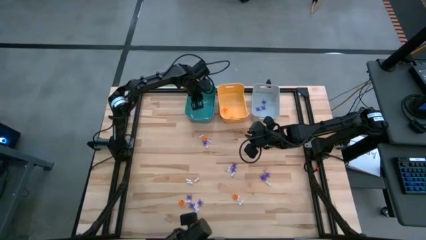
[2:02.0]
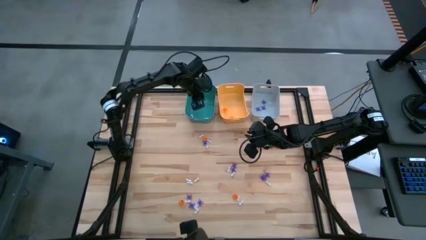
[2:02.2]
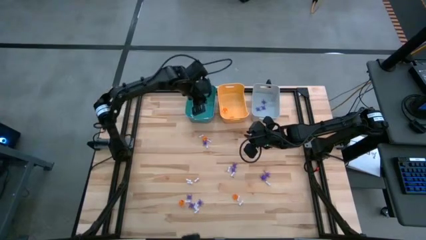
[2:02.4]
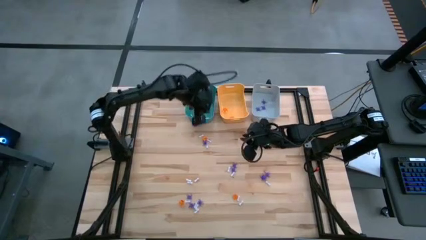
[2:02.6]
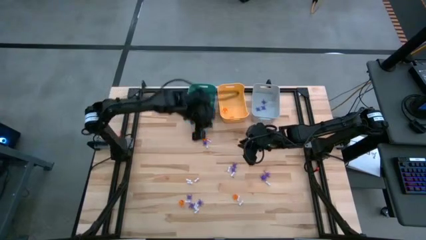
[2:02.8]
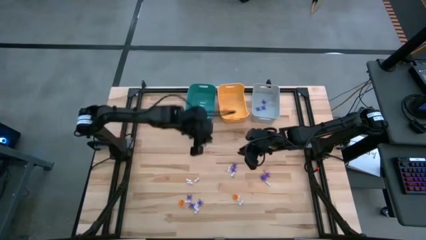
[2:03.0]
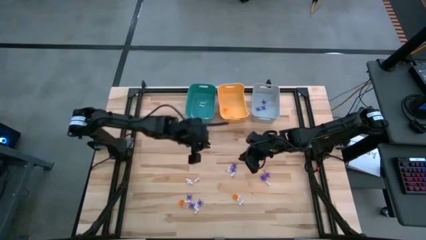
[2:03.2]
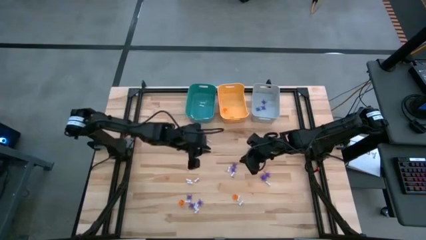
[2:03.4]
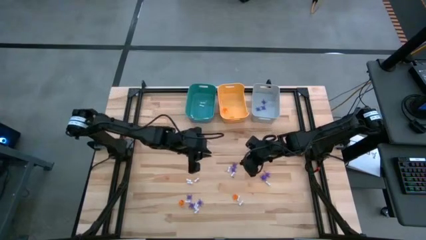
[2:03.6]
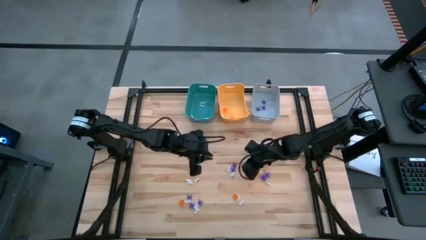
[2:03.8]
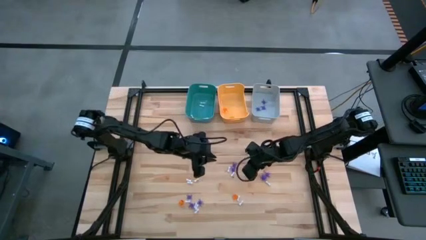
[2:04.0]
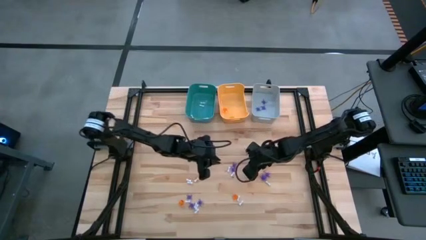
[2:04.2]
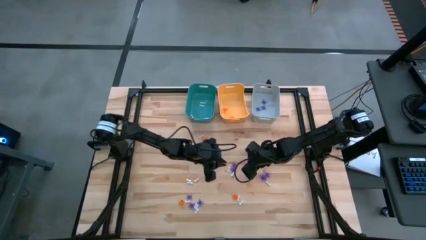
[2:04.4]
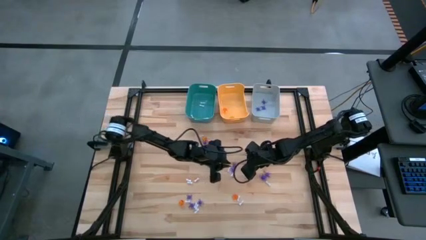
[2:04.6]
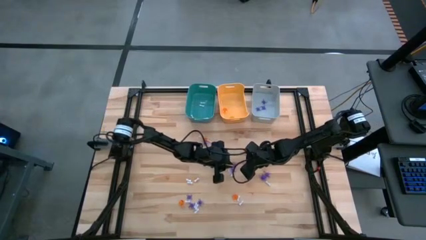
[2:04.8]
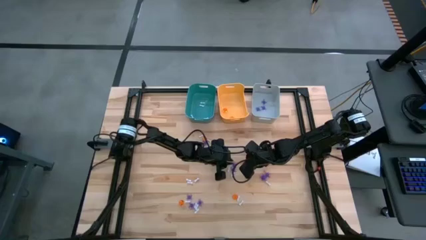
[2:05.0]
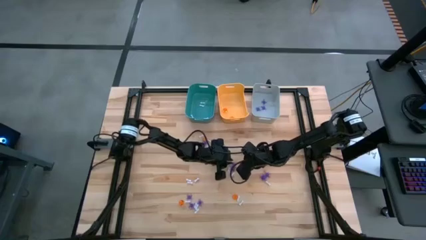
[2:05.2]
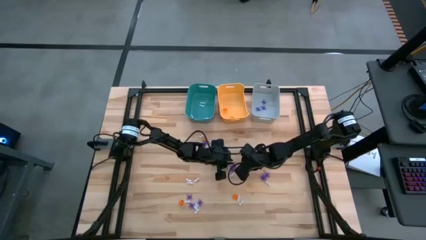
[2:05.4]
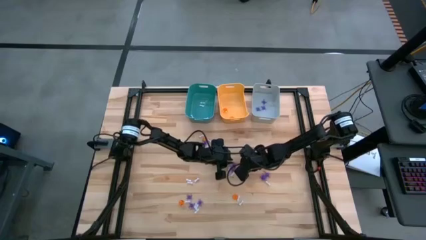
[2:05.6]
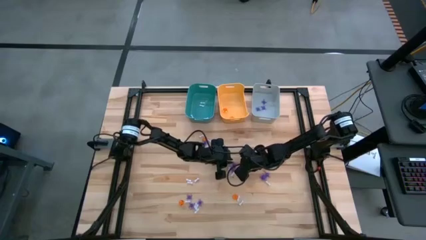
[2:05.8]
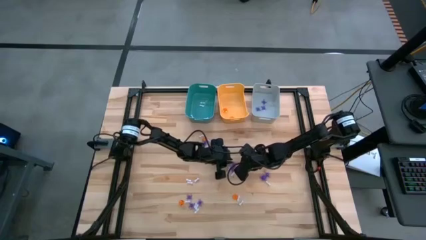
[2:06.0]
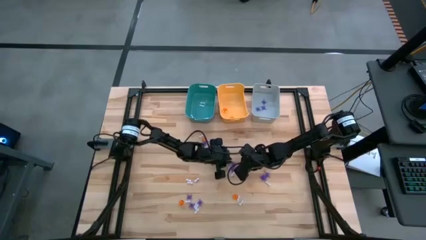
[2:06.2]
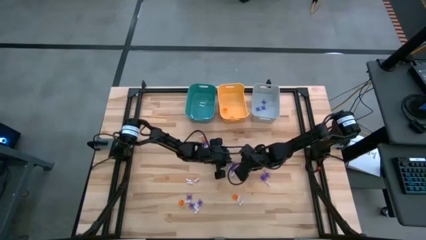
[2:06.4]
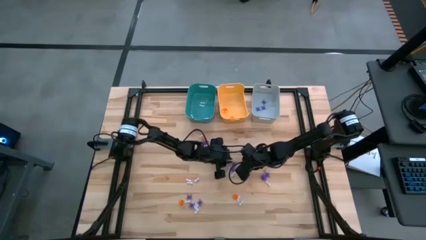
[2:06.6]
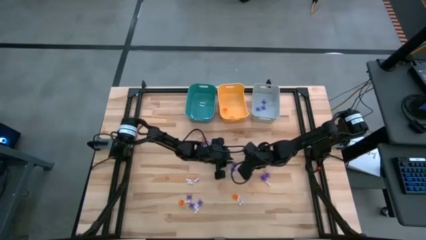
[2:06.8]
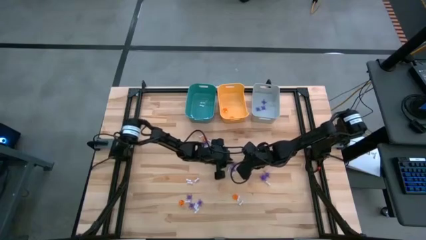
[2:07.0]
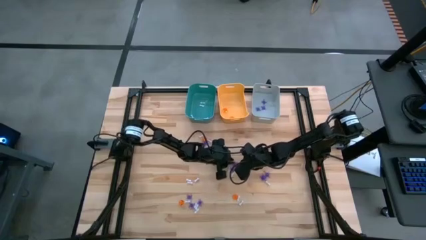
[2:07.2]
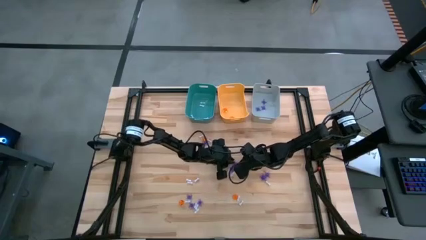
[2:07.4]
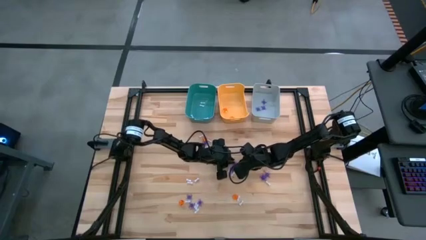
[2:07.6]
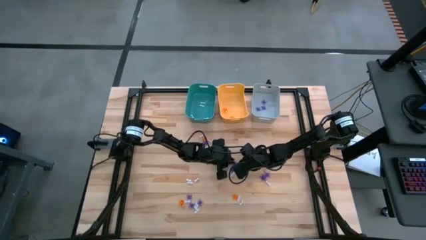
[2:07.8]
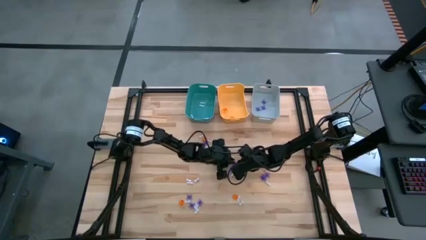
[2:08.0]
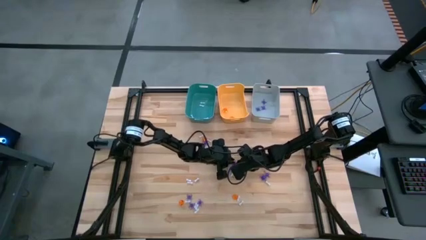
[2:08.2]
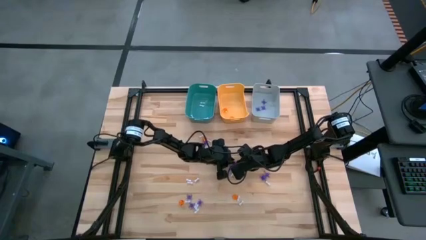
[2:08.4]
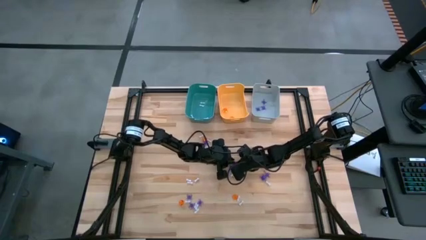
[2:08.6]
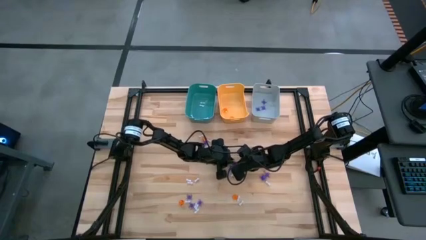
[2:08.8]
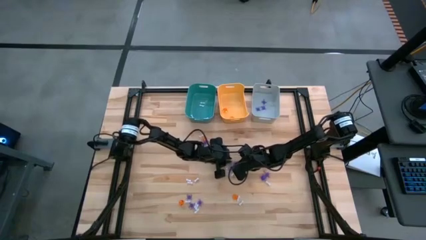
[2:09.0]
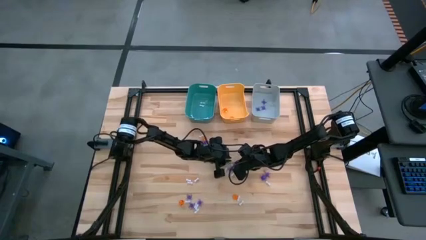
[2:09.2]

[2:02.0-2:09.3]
Task: Sort Halloween decoration
Put the purple spider toy into the gray bin

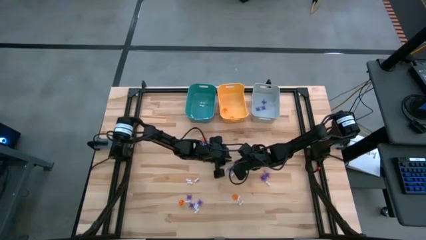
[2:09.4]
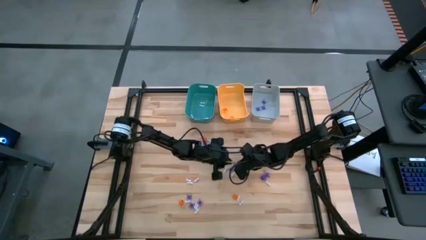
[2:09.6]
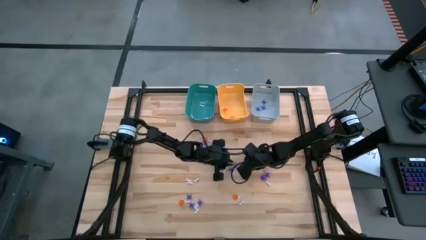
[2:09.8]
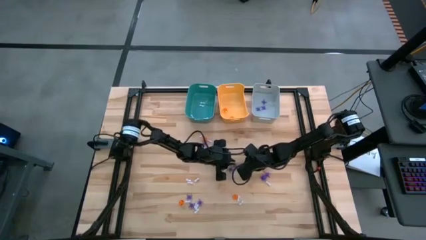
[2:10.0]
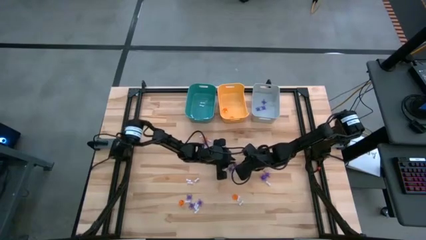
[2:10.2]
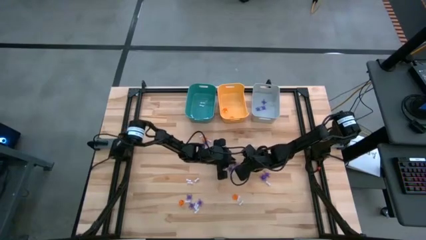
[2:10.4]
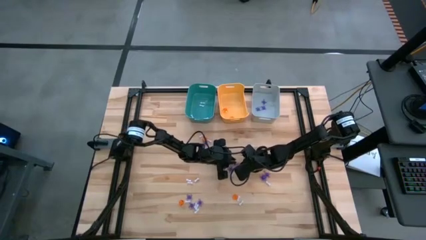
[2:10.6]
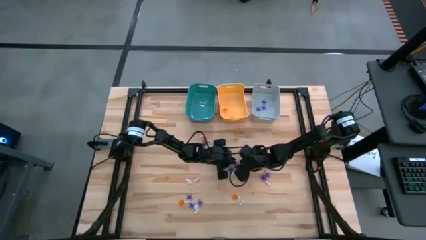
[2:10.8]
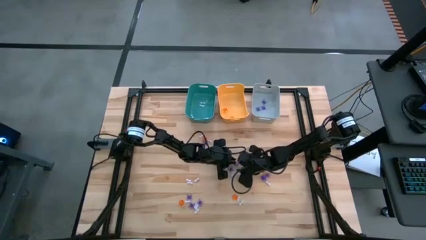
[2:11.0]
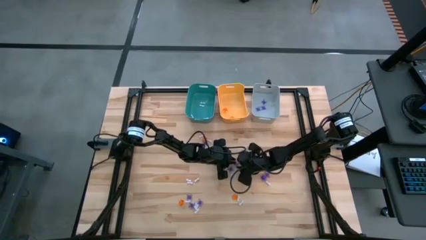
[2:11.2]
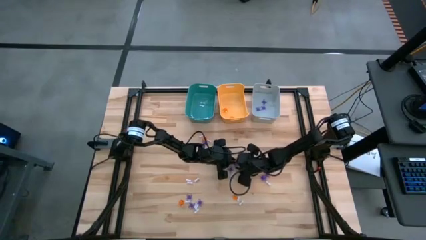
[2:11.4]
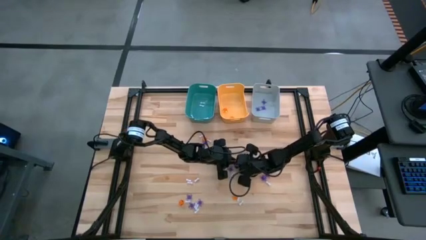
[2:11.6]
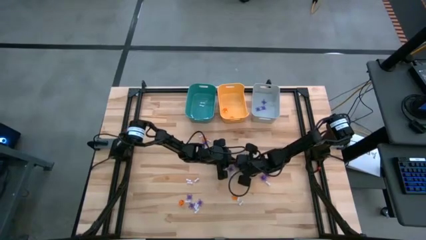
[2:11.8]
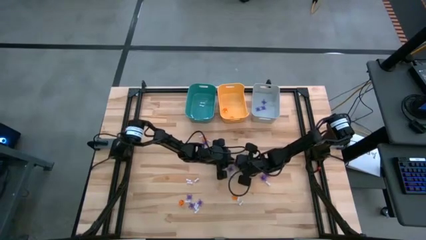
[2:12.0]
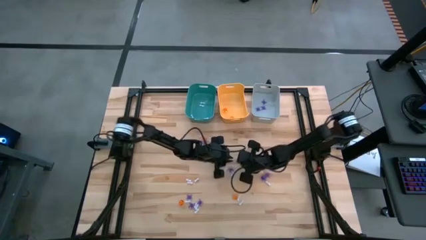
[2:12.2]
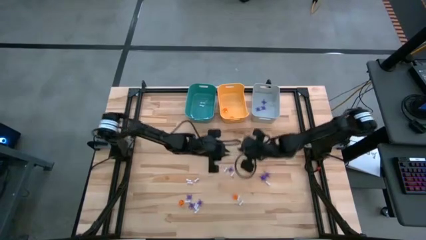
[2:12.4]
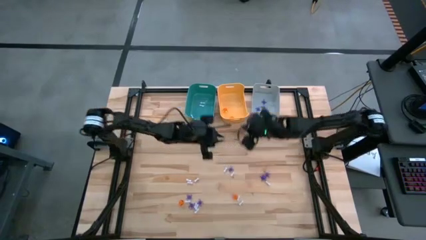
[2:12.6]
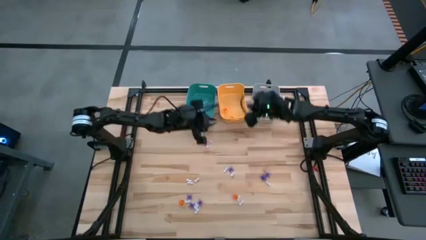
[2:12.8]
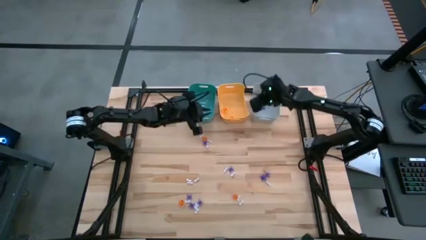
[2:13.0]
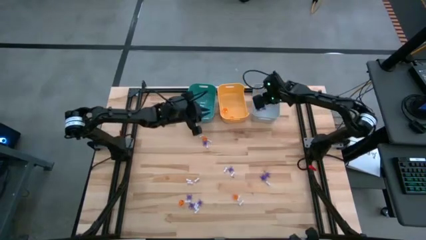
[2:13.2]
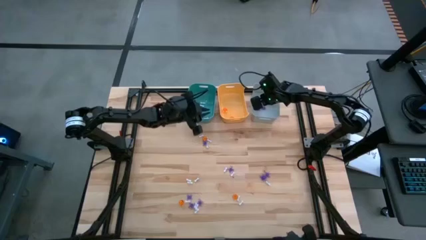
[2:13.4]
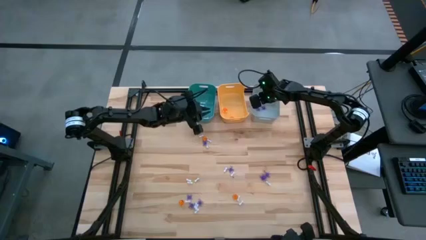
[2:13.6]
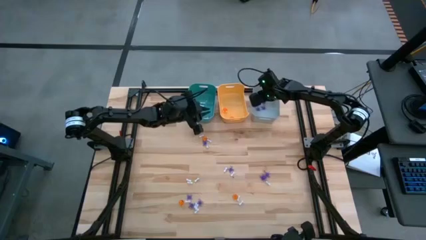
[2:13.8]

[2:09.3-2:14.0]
Put the purple spider toy into the gray bin

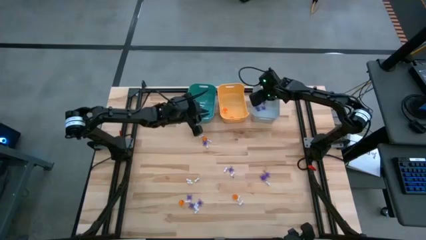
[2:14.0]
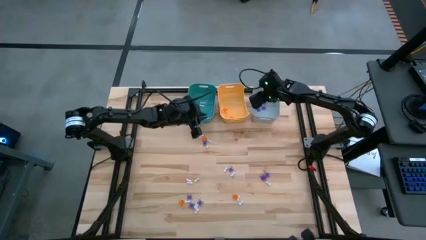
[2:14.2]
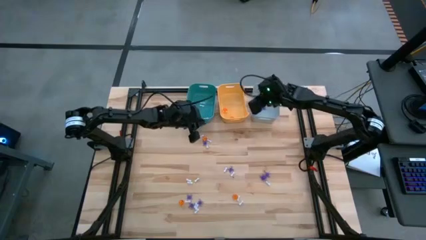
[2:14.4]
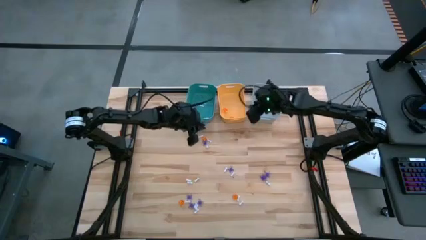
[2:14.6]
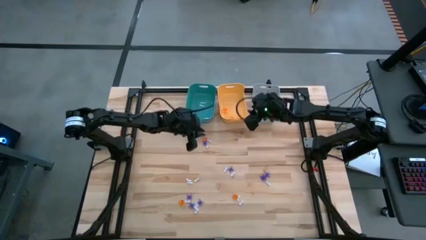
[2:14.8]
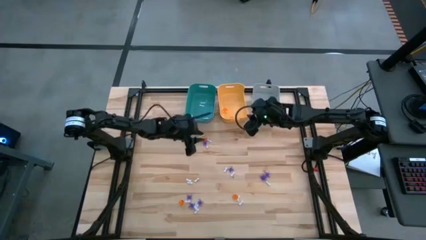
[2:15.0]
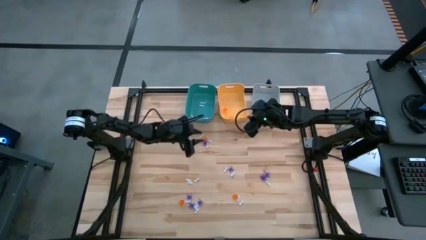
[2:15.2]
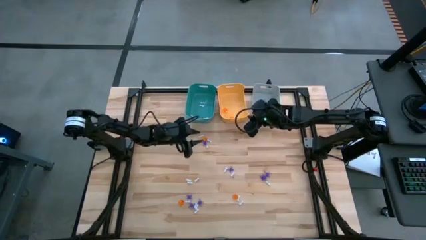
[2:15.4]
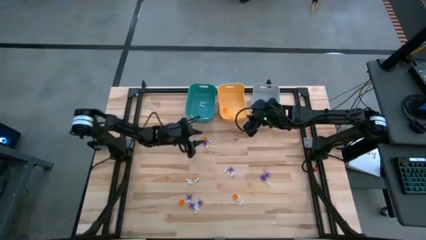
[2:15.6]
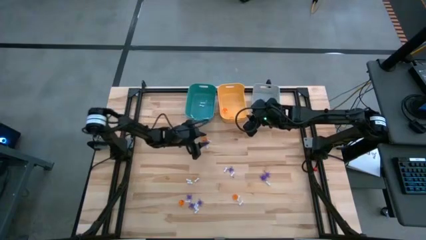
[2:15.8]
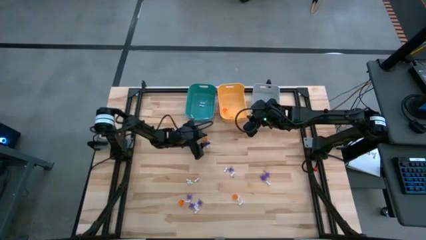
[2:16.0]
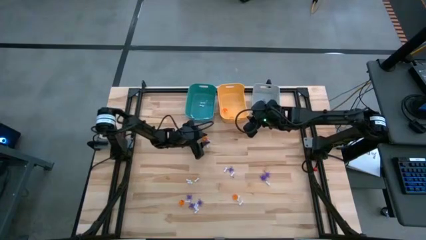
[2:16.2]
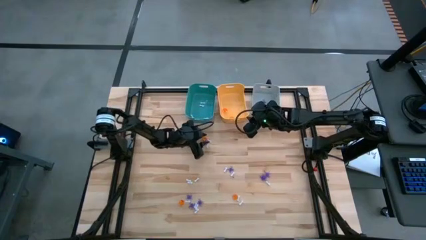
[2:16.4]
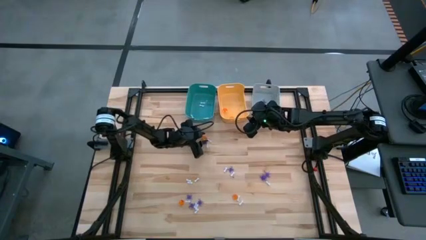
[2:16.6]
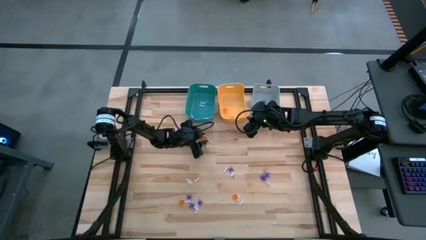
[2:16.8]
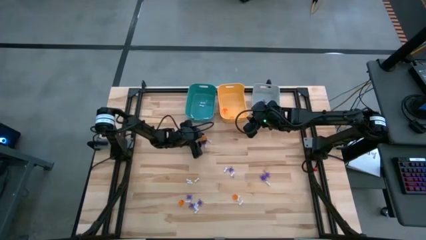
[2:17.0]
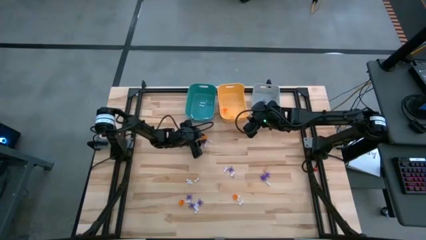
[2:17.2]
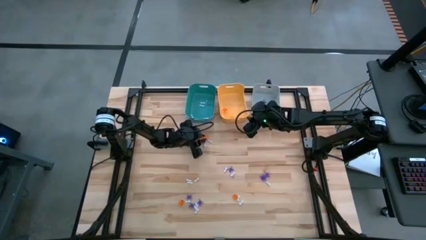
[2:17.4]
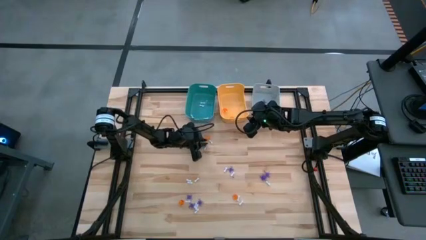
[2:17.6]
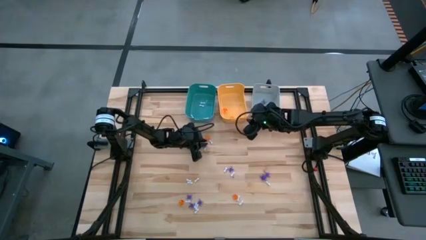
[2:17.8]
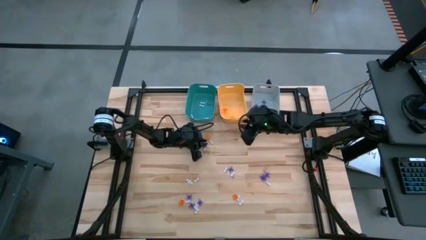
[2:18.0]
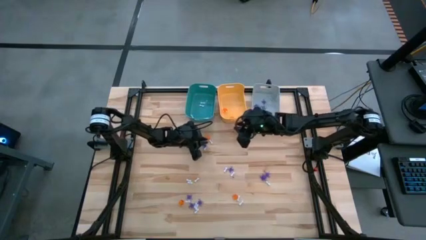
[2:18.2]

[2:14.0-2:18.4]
Put the orange pumpkin toy into the yellow bin
